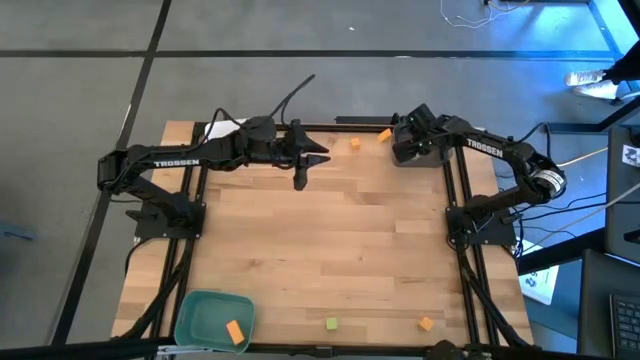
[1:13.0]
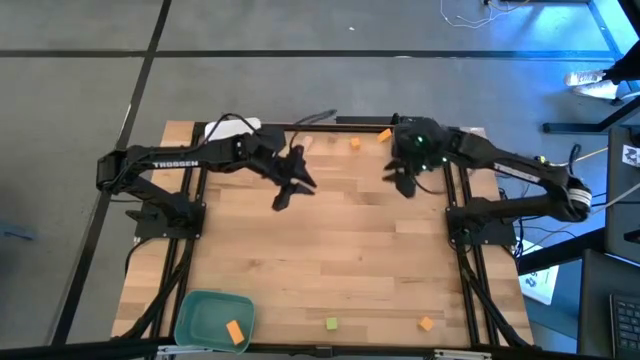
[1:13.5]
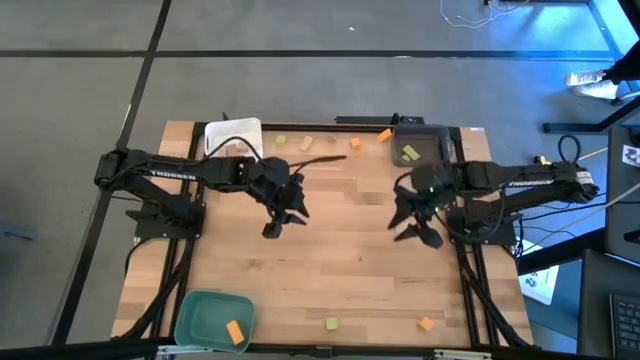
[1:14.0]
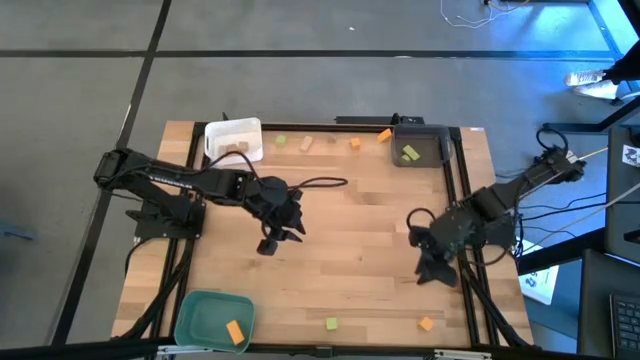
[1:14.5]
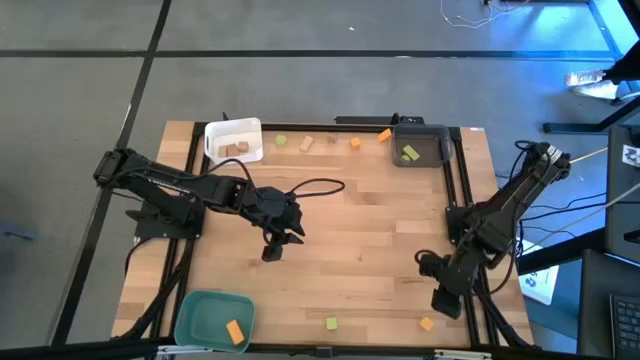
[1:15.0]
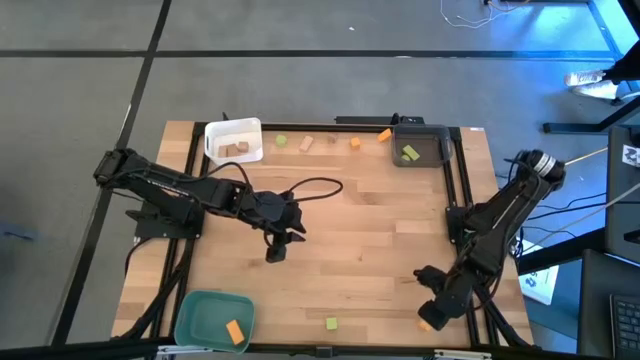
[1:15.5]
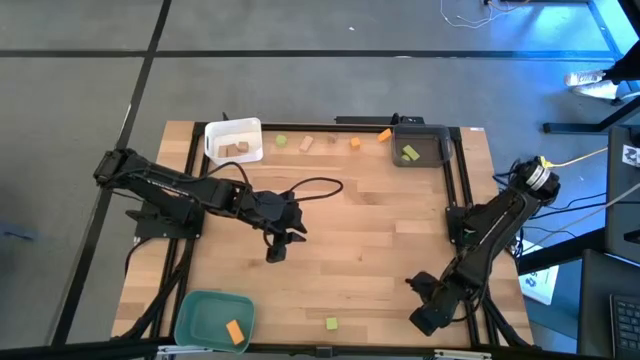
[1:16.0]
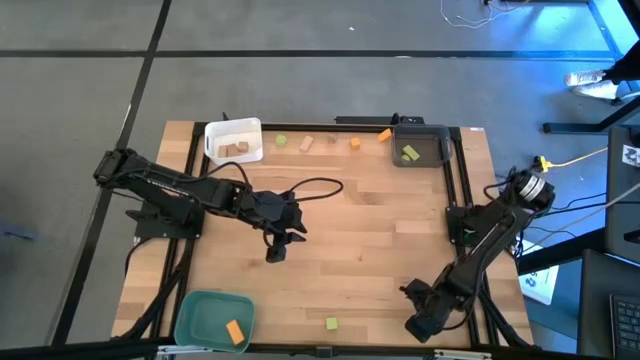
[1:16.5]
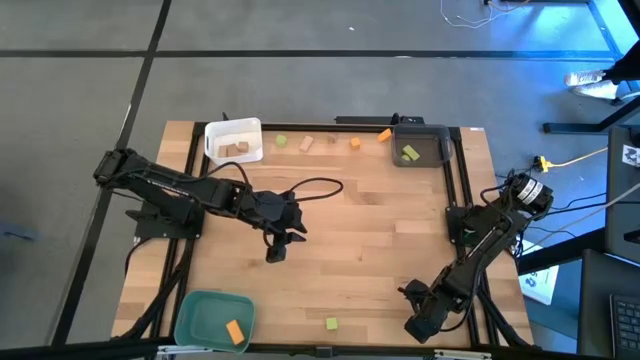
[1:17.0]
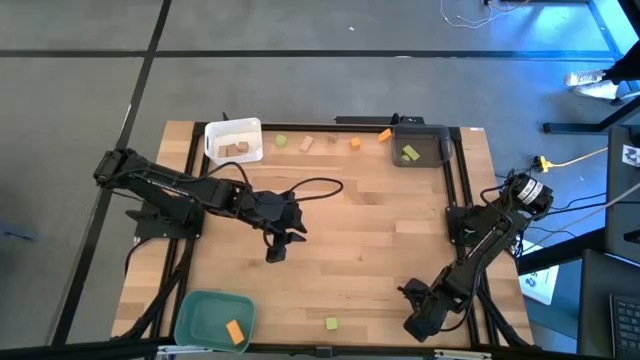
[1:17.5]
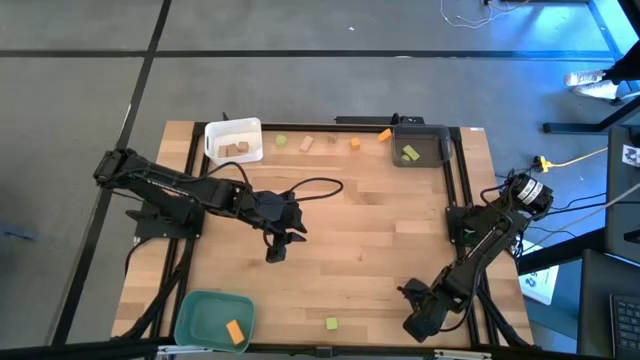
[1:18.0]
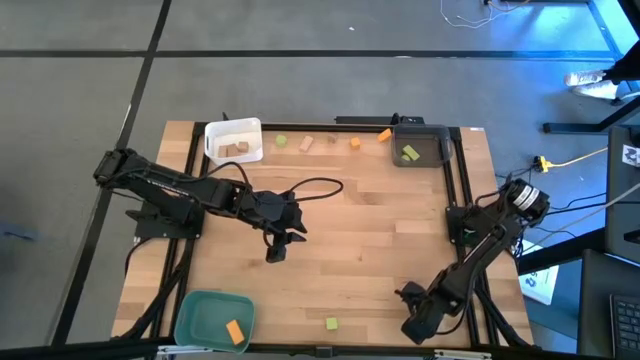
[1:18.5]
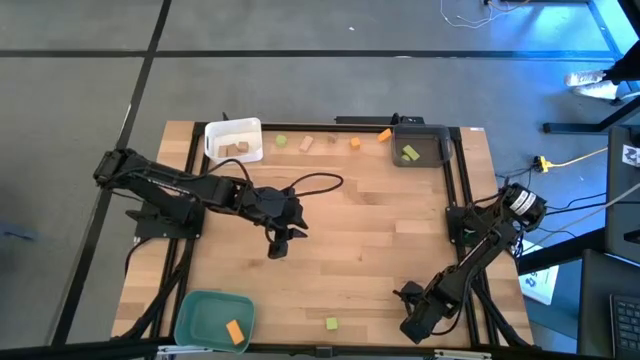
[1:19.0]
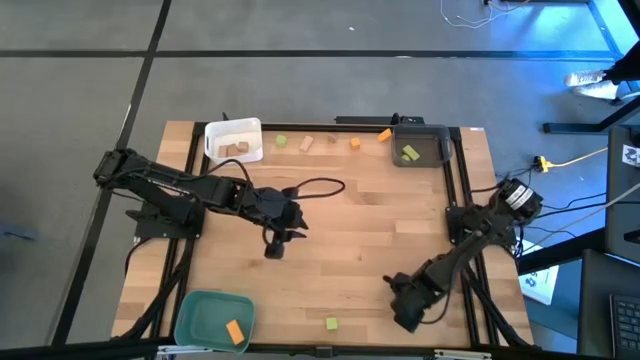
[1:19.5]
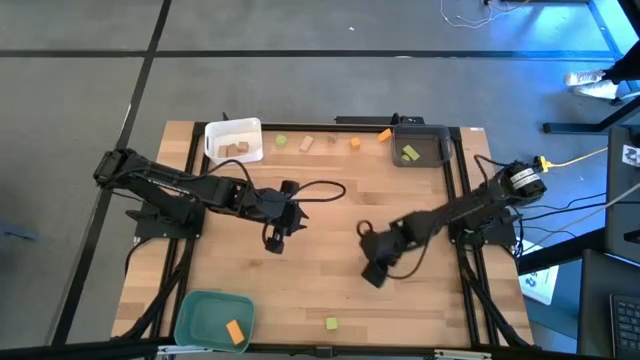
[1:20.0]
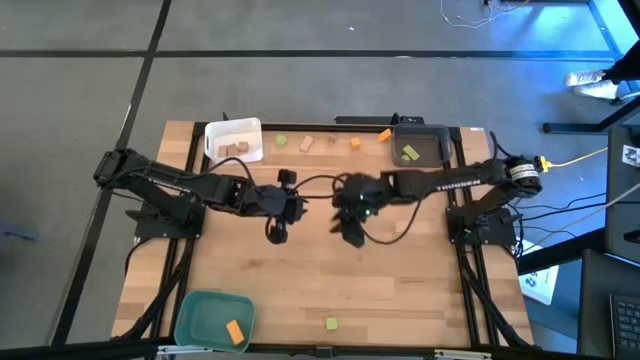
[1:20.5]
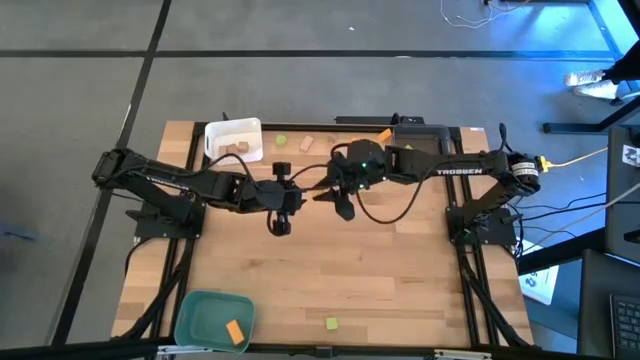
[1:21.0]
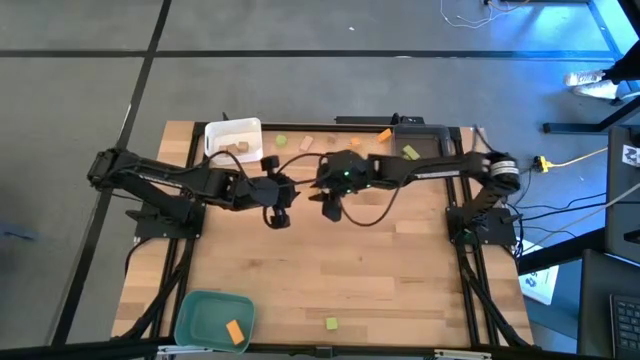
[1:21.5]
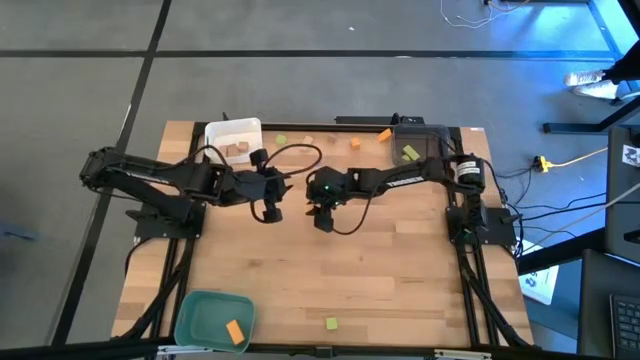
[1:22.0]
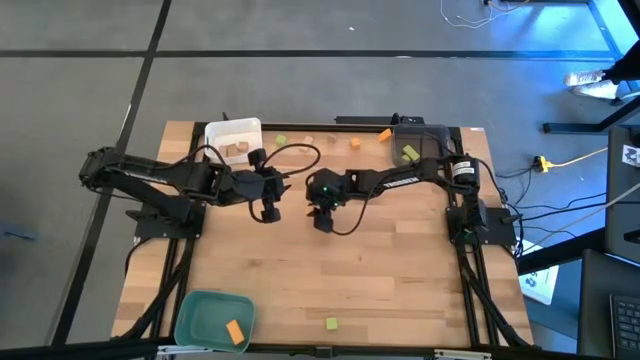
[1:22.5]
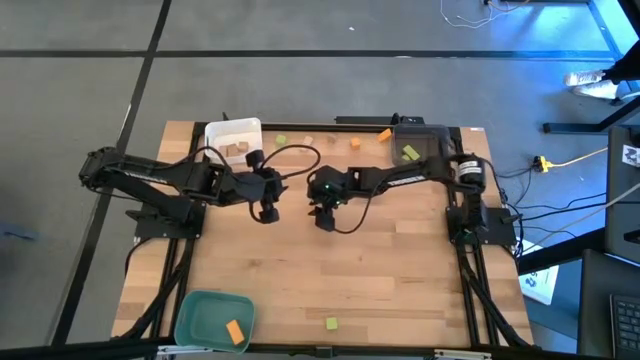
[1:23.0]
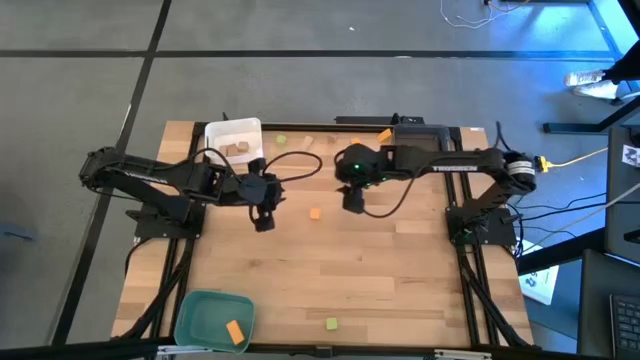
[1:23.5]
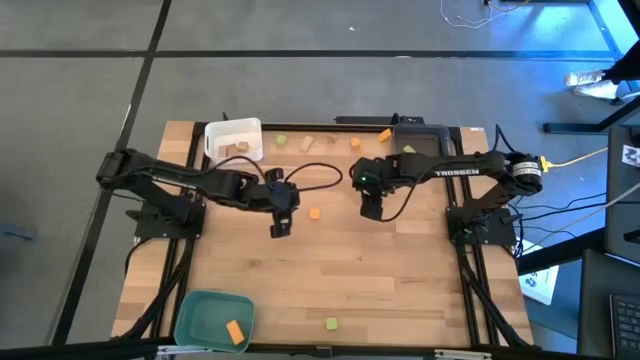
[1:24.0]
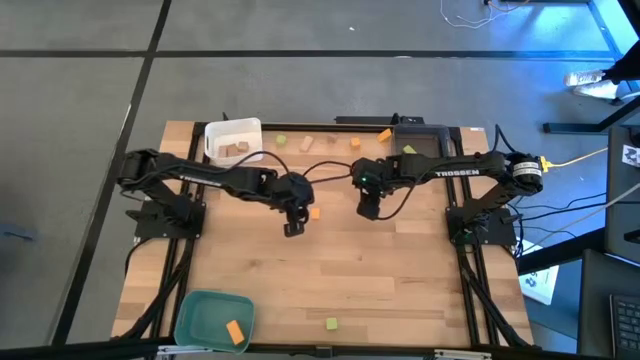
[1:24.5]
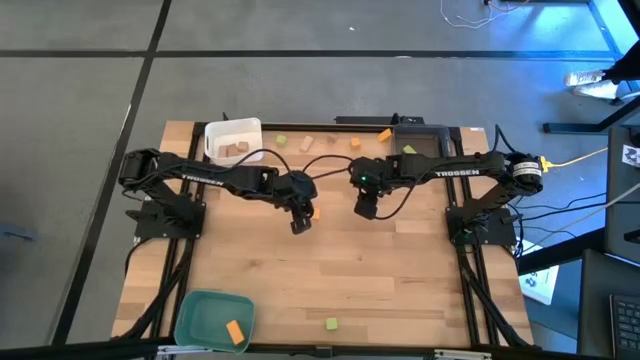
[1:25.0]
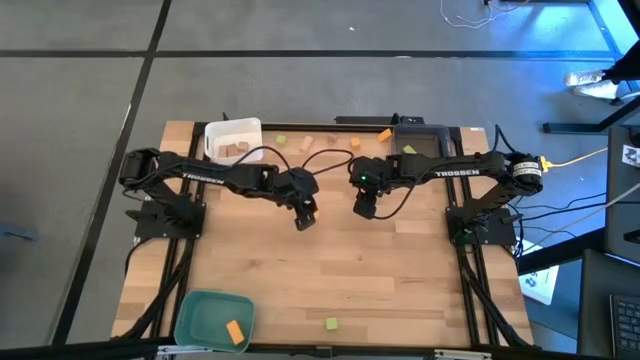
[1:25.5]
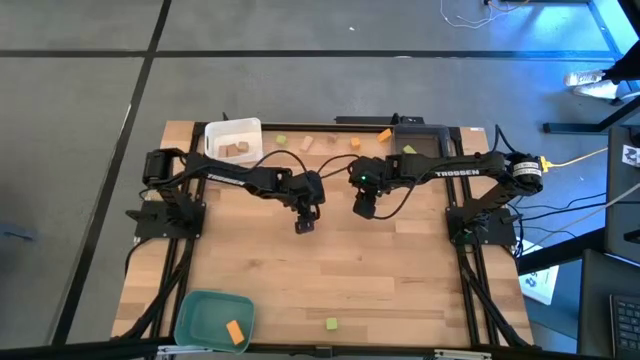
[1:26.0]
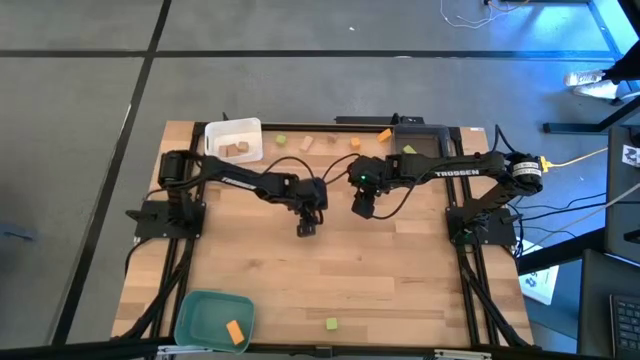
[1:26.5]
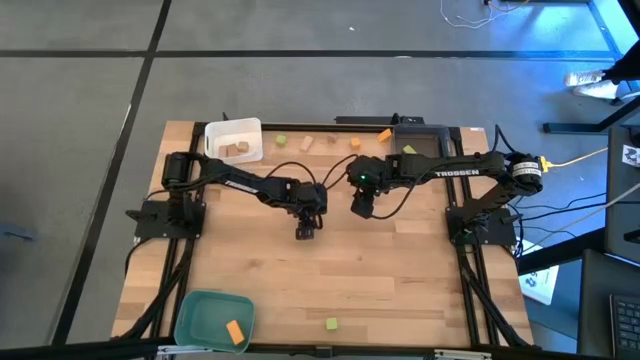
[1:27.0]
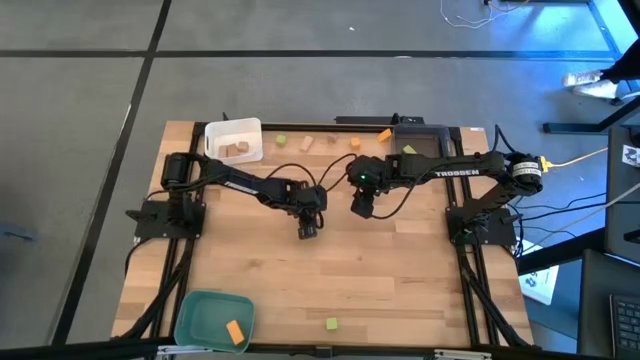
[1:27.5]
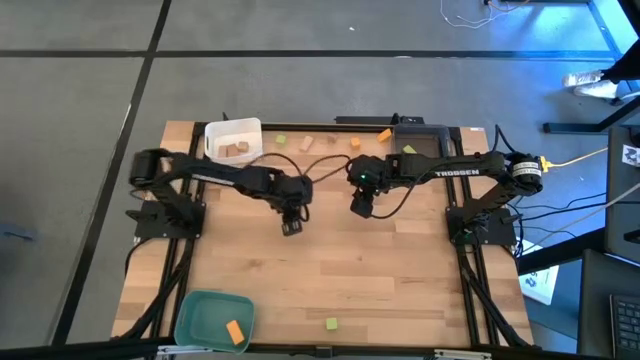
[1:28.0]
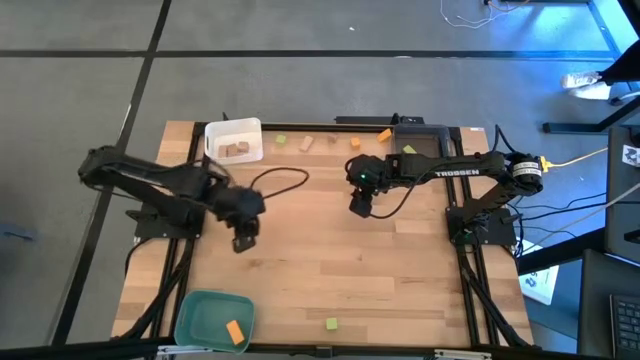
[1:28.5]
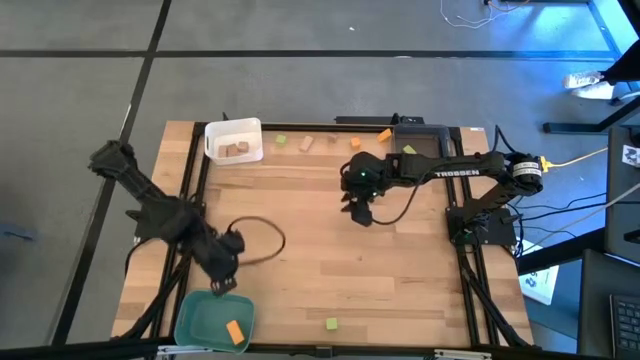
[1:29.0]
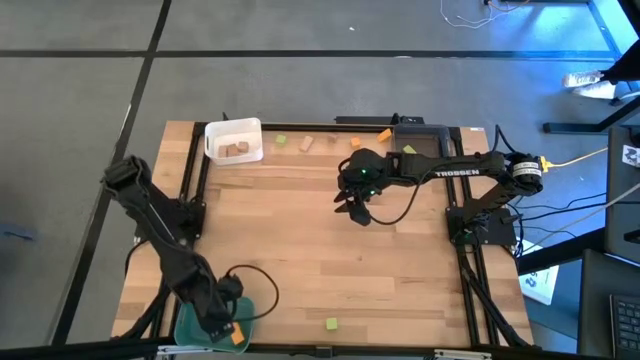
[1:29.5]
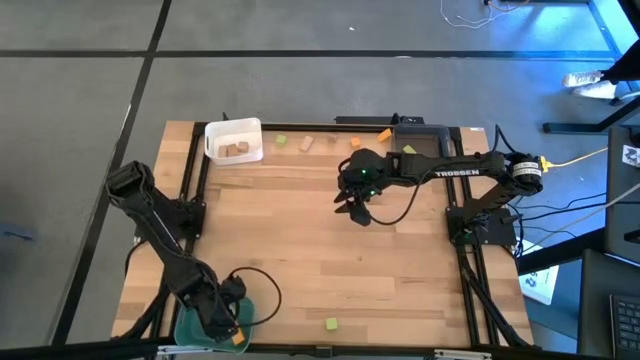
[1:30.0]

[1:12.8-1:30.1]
Task: Sort & place blocks by color
Put the orange block into the green bin

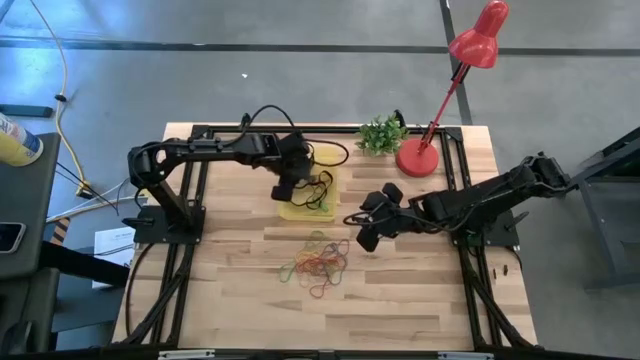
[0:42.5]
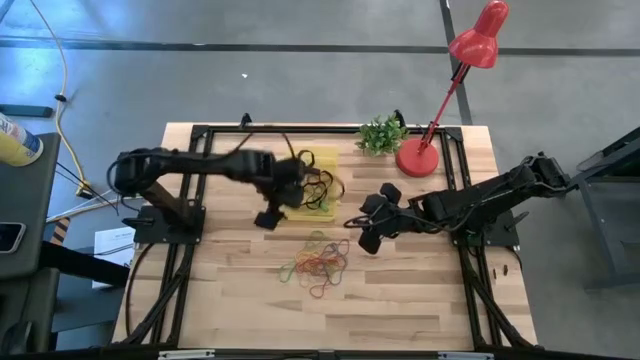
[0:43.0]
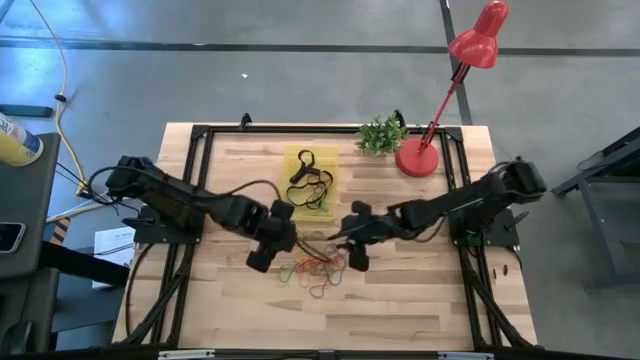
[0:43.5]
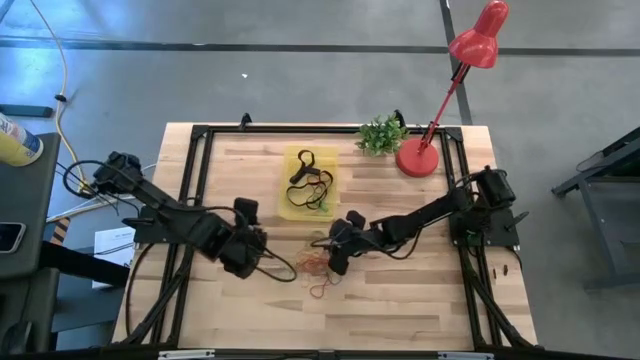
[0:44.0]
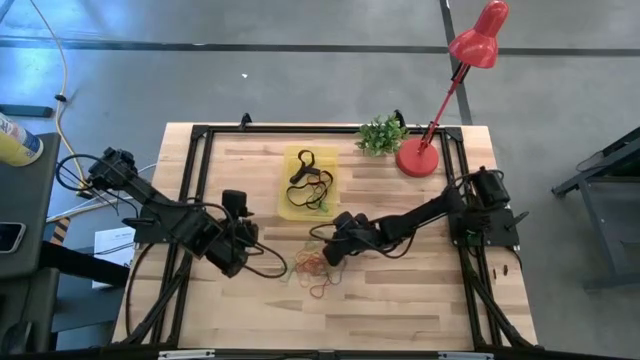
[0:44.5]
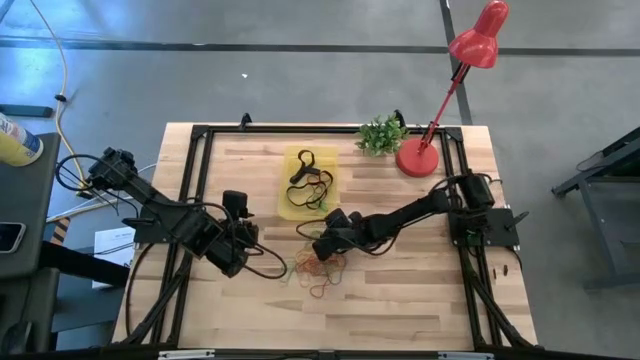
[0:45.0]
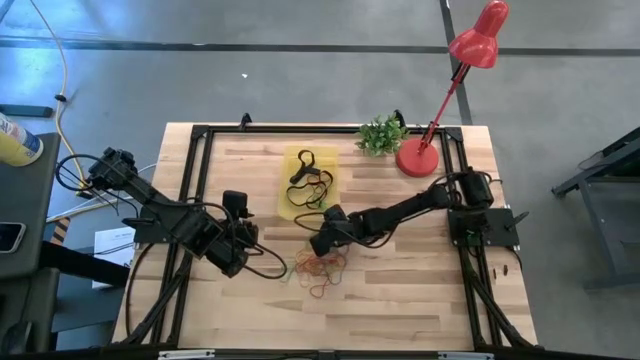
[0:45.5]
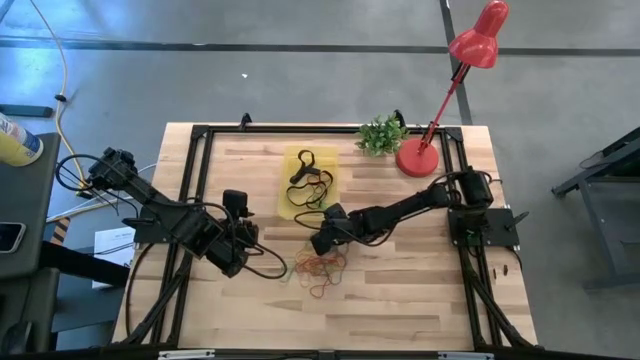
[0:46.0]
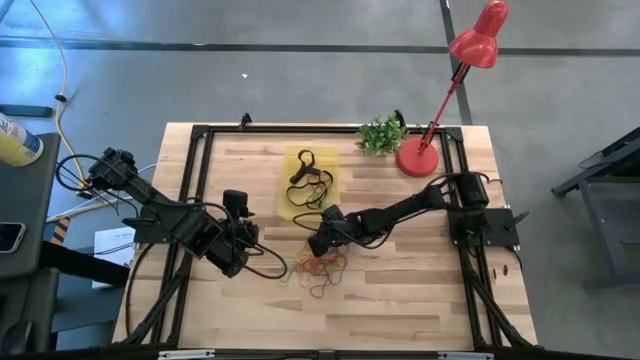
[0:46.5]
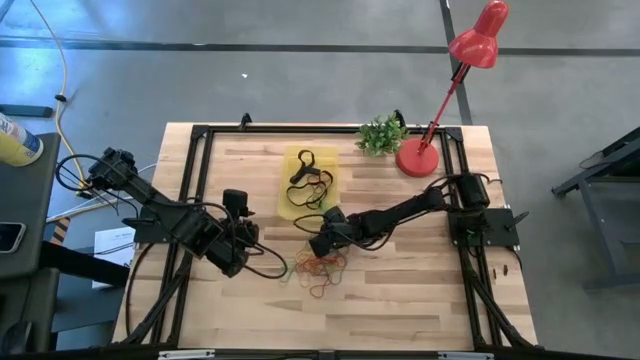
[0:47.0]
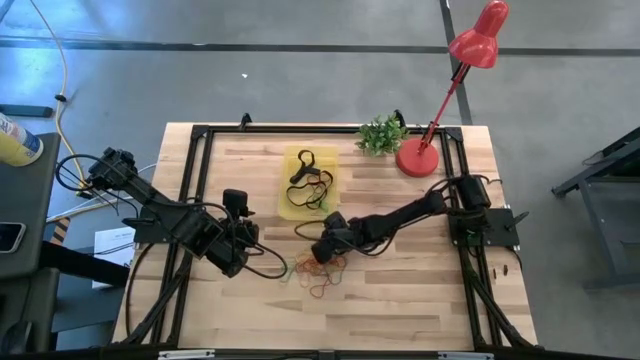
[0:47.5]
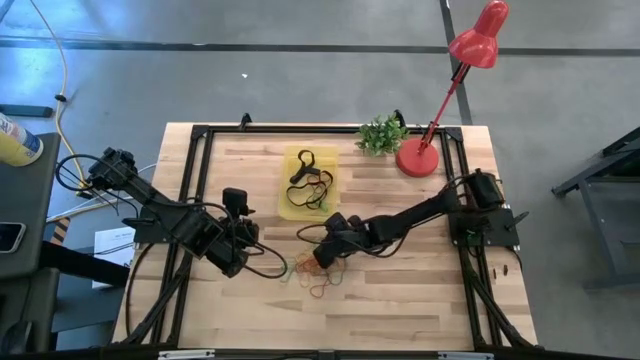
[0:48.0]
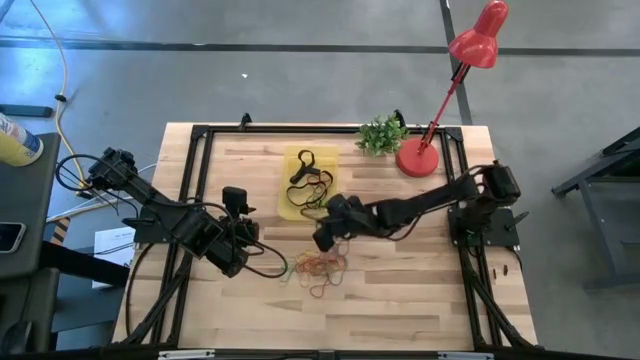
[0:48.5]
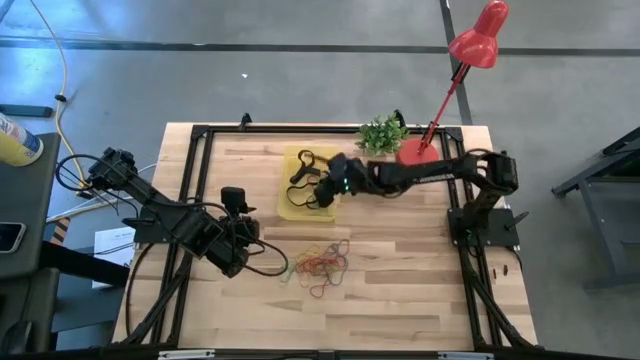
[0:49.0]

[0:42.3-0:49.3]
Task: Pick and place rubber bands into bin
Put the green rubber band into the yellow bin
